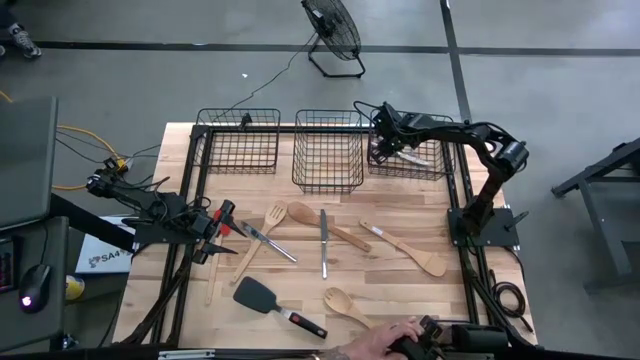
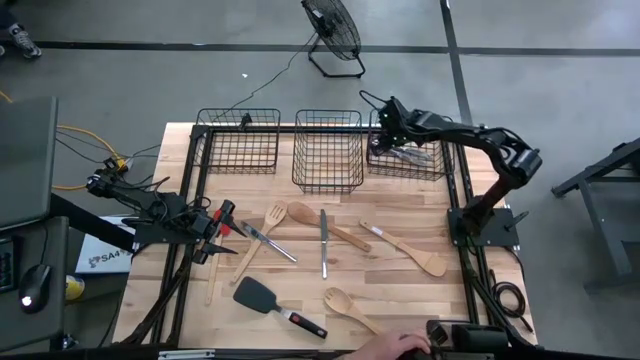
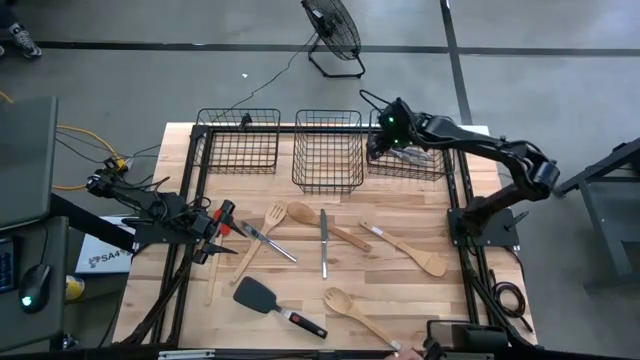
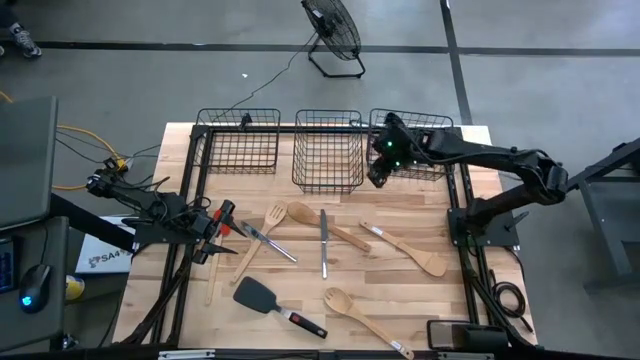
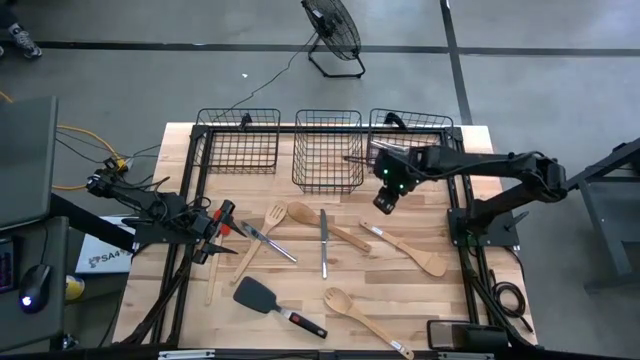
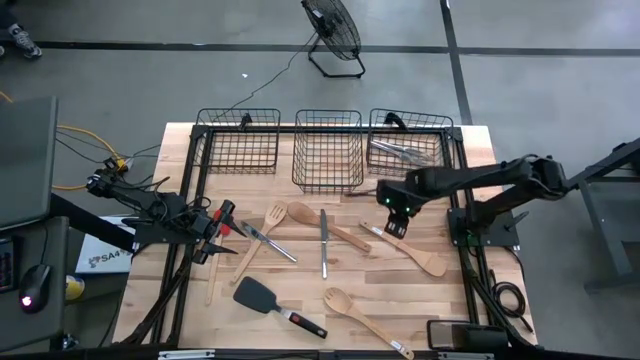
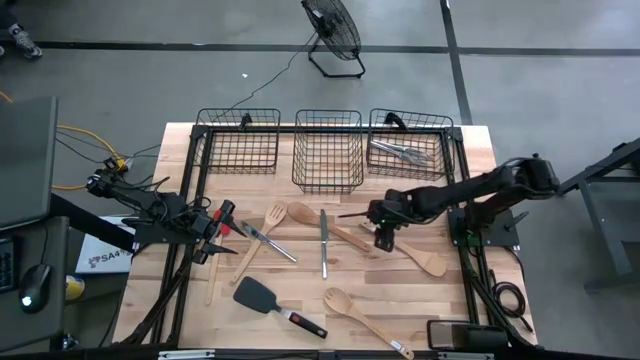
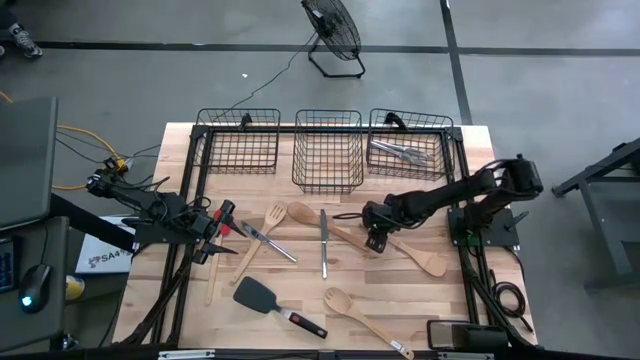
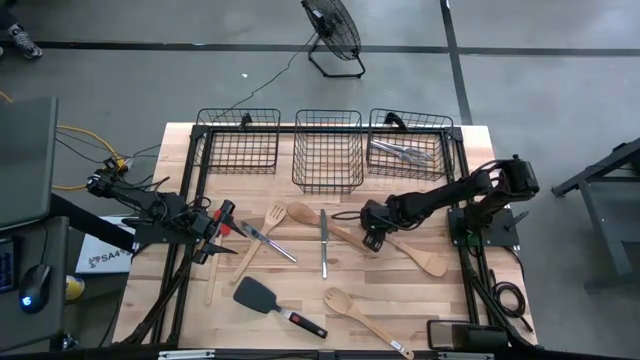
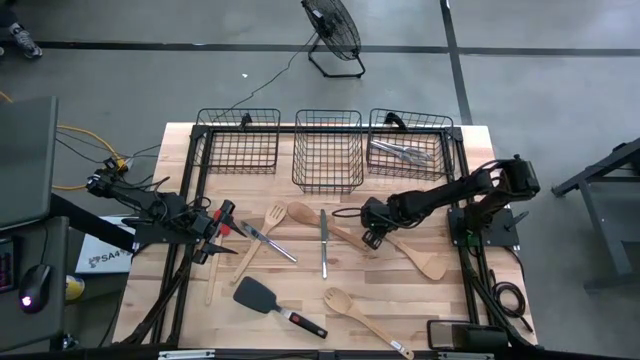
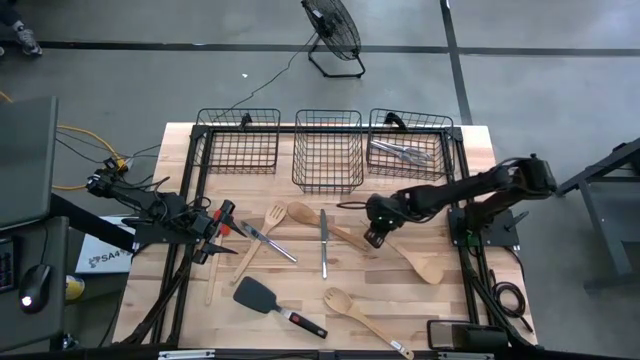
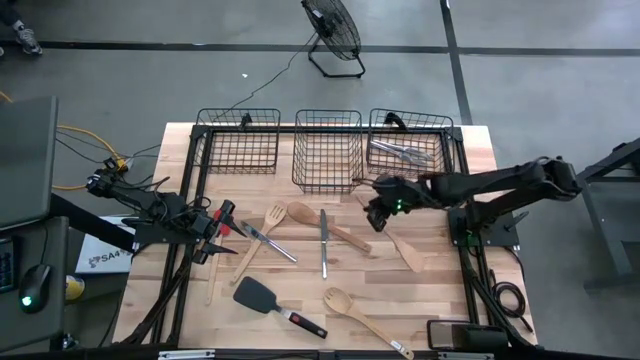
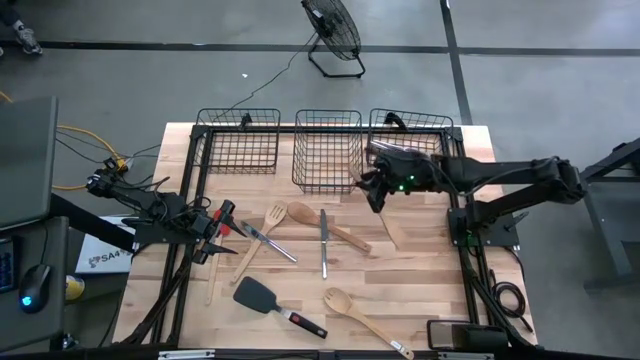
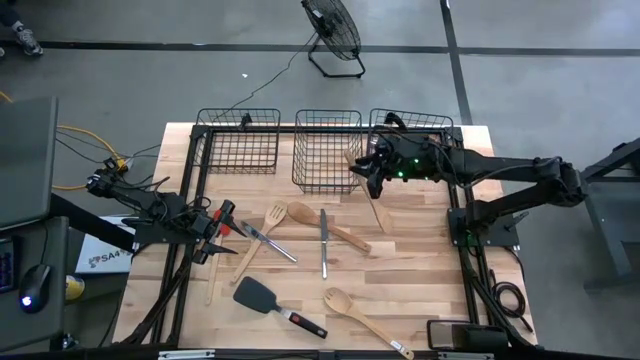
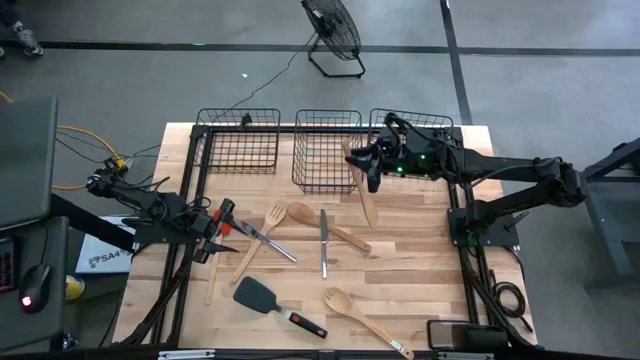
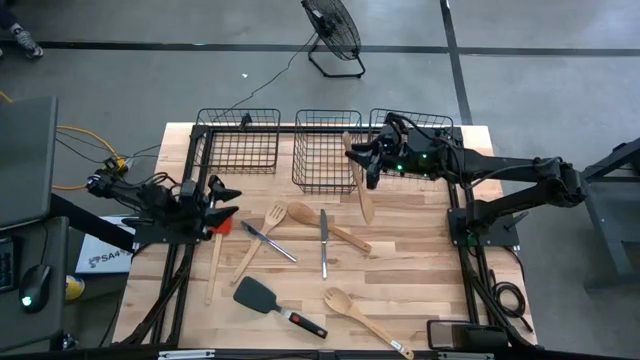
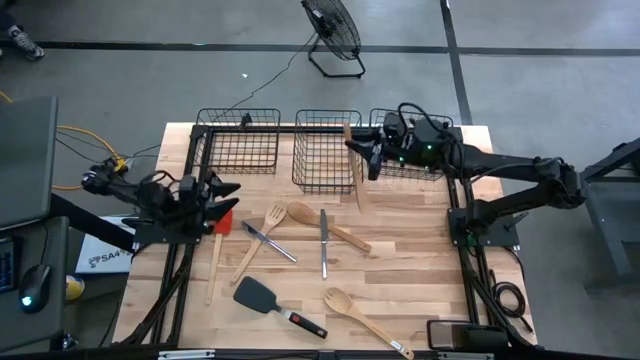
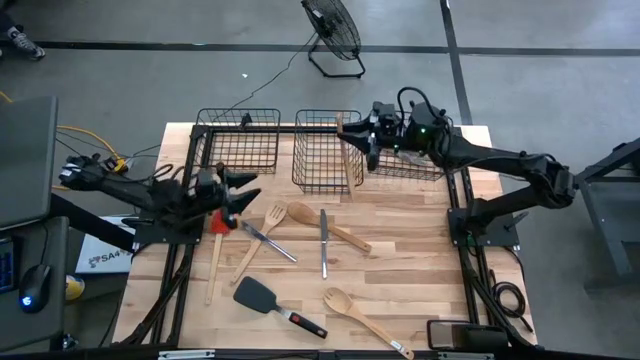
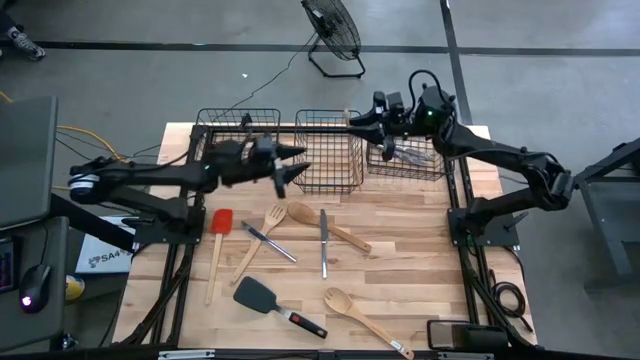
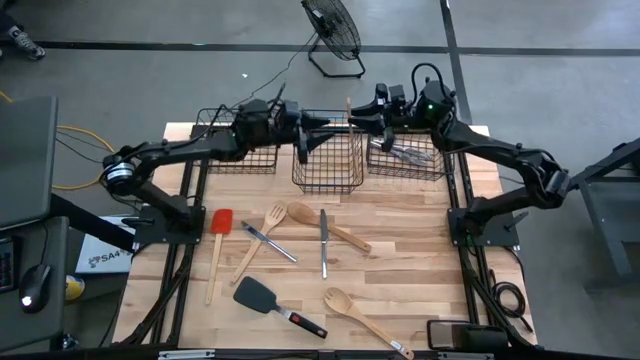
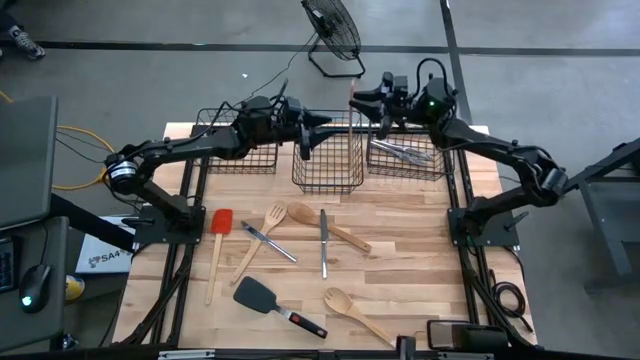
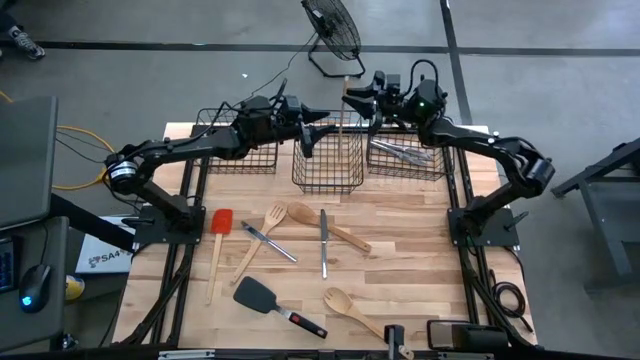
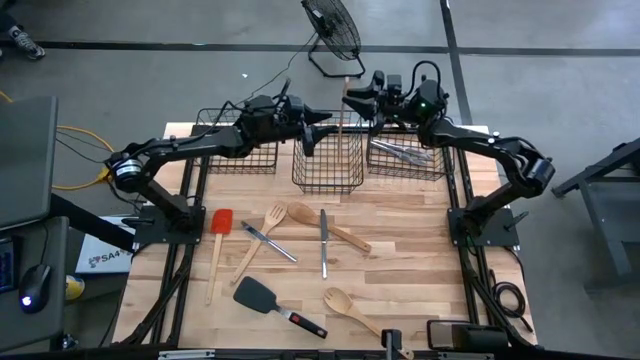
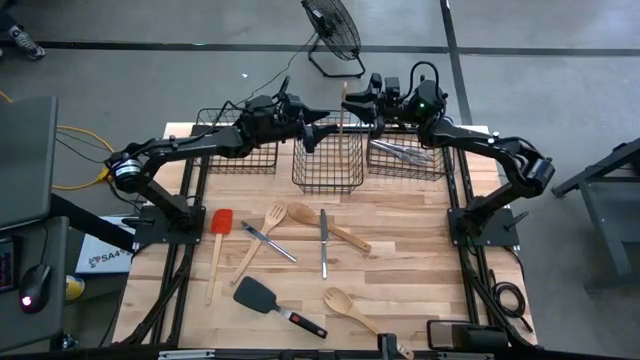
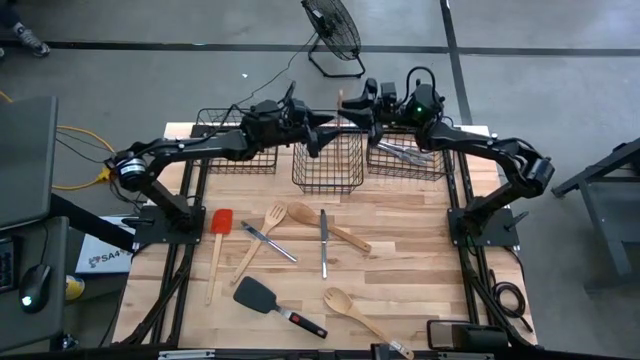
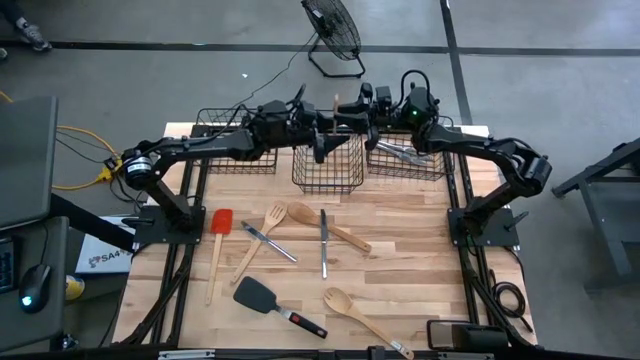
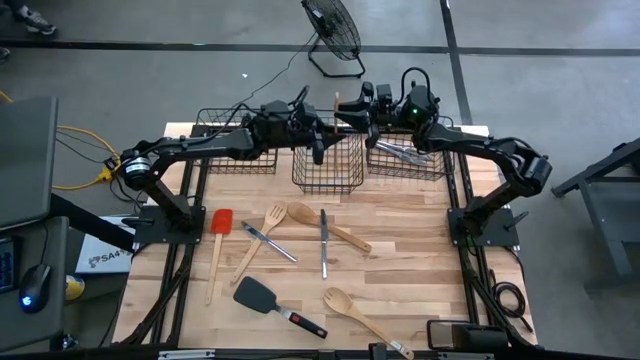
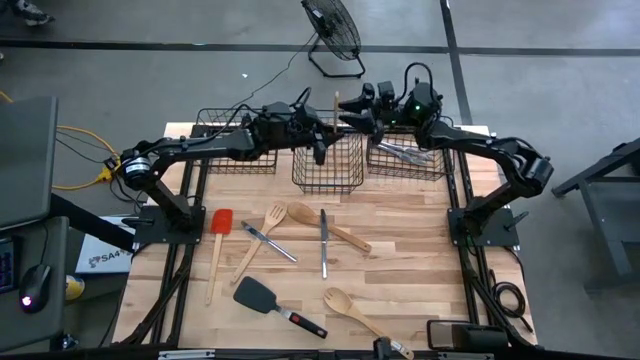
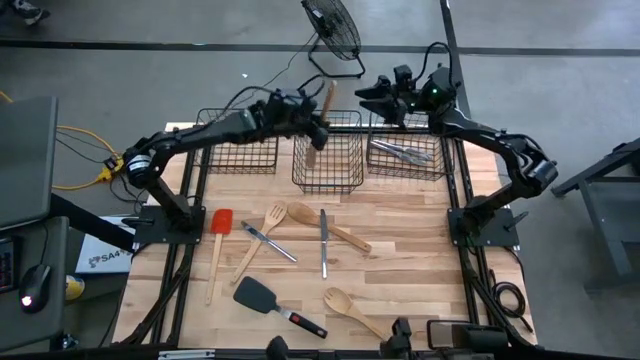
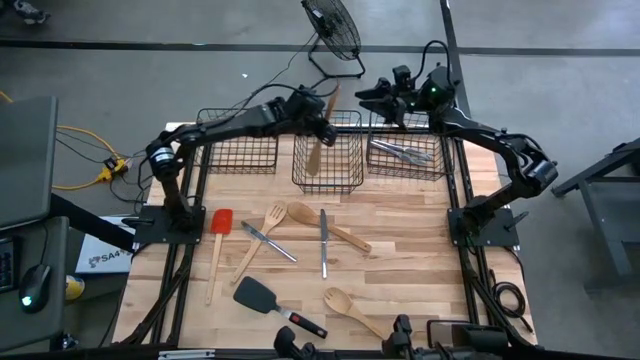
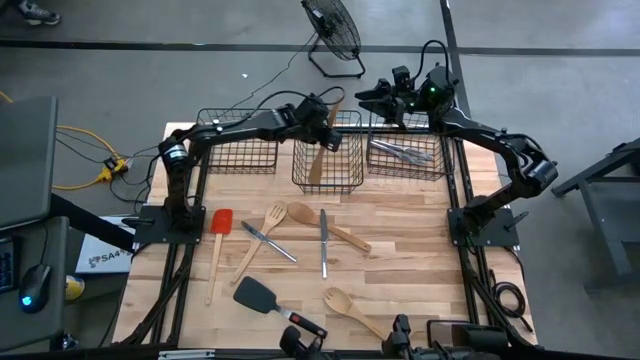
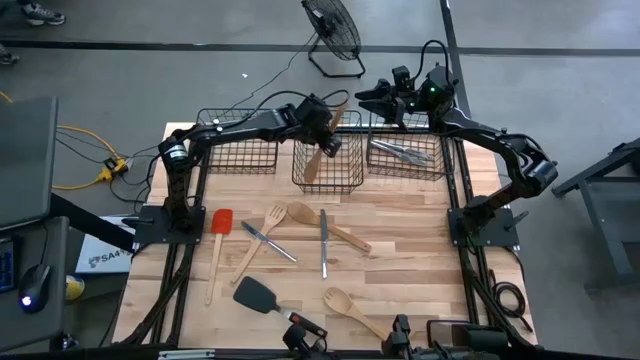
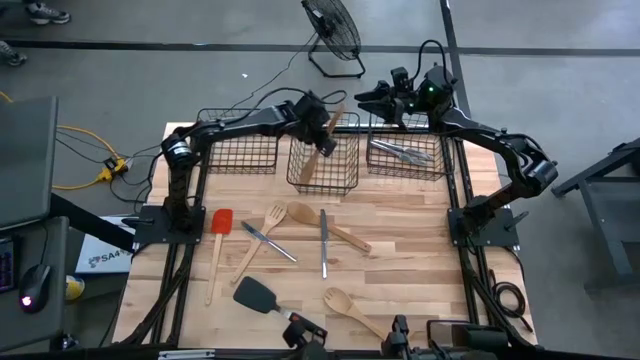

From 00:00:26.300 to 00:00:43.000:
Task: Pick & Place Kitchen Items
Put the brown serving spoon into the middle wire basket

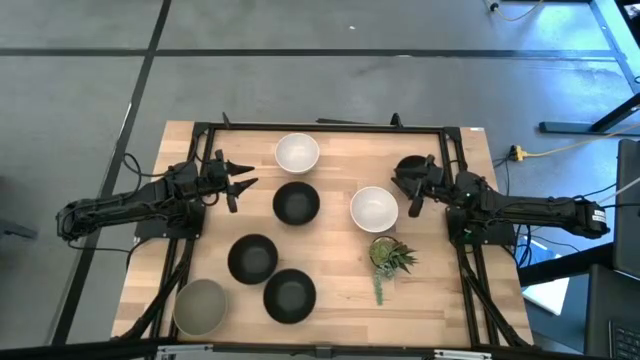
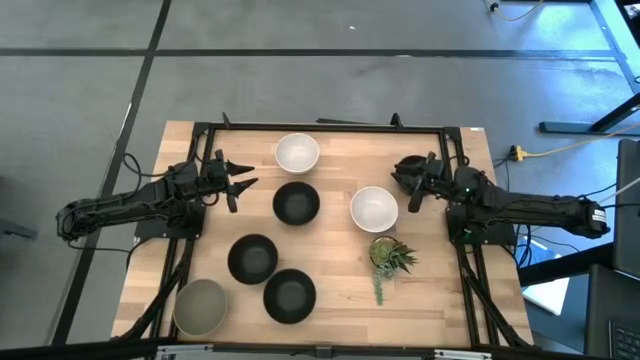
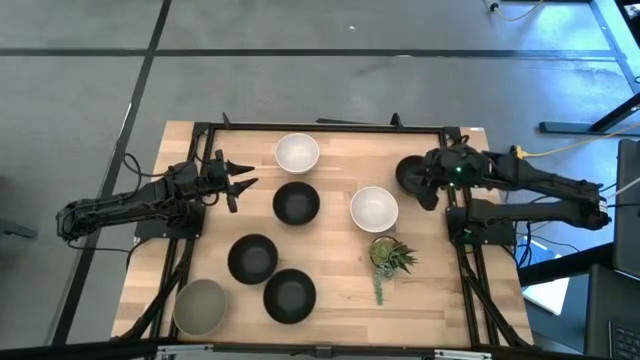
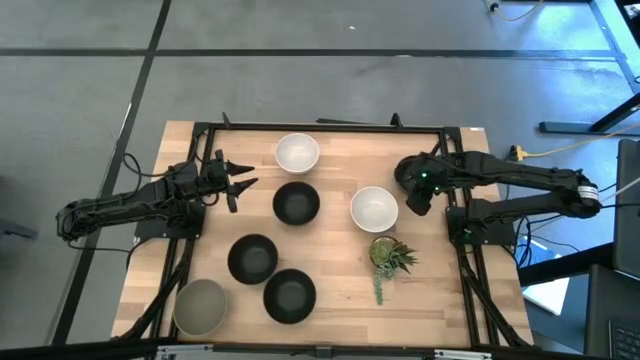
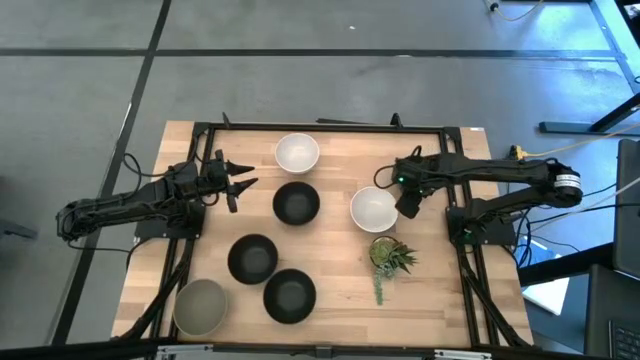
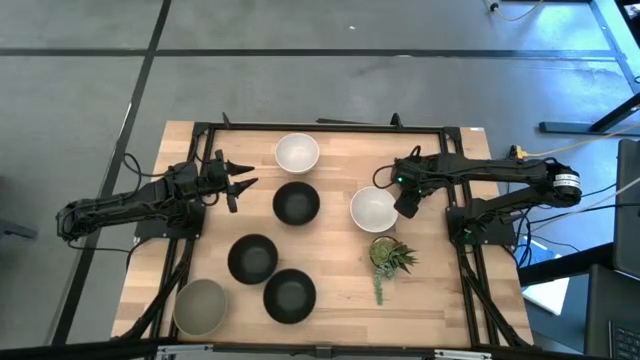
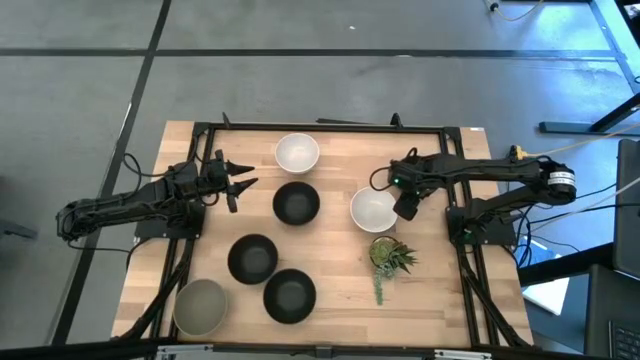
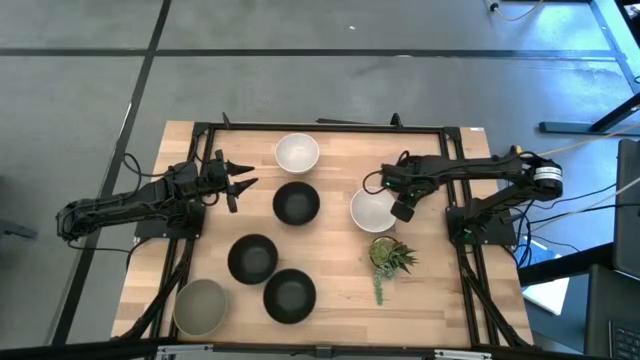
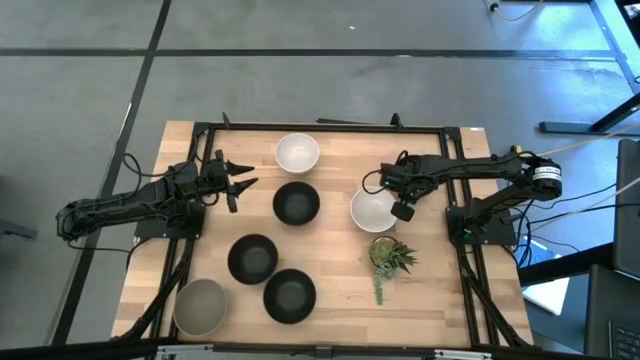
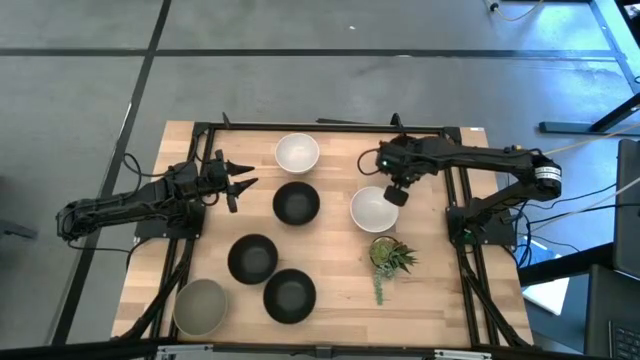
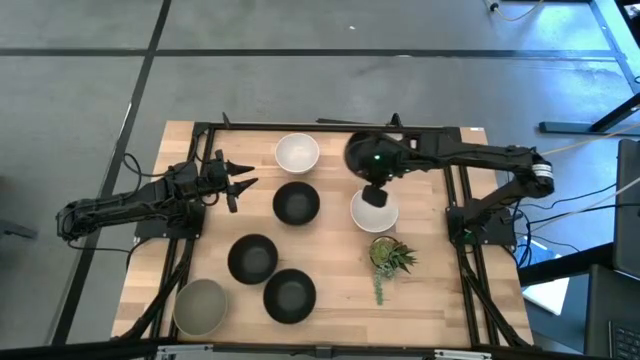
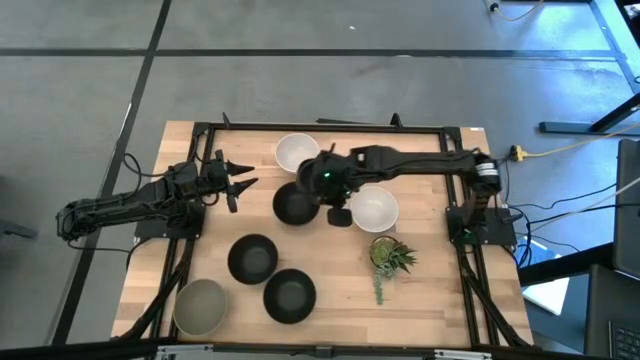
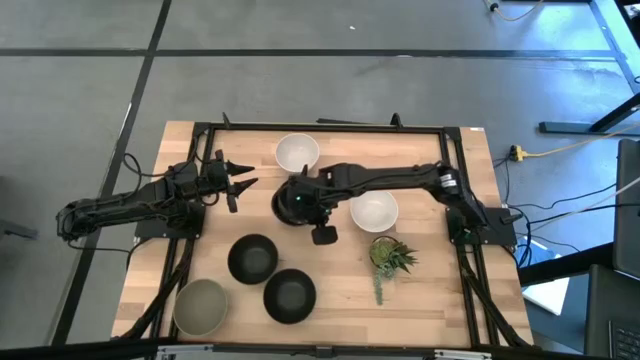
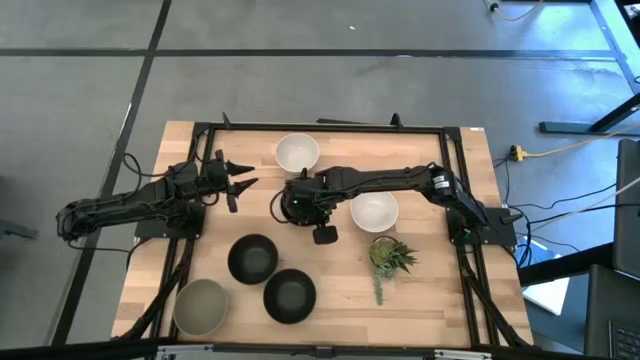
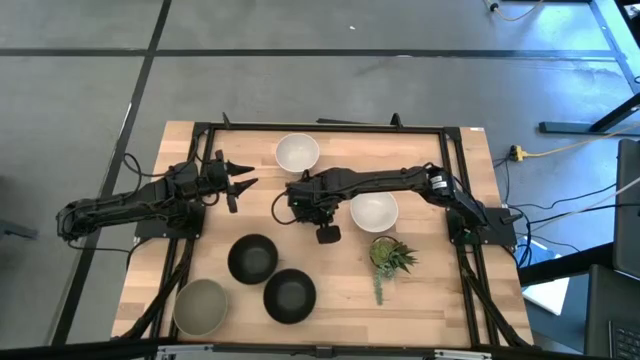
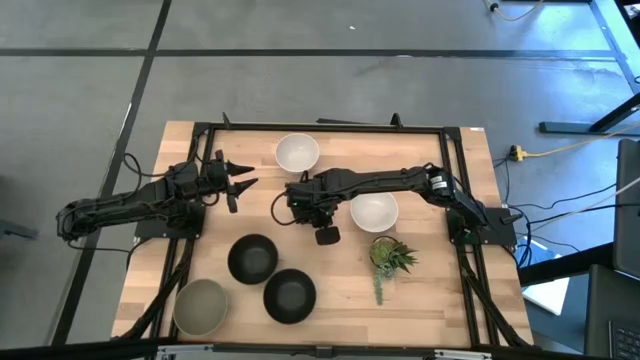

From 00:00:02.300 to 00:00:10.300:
Task: Nest bowls inside each other
Stack the top right black bowl on top of the other top left black bowl
